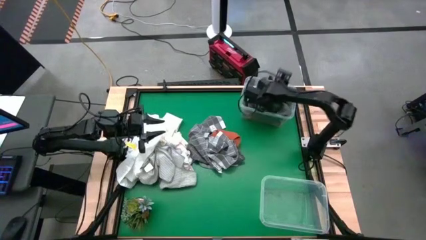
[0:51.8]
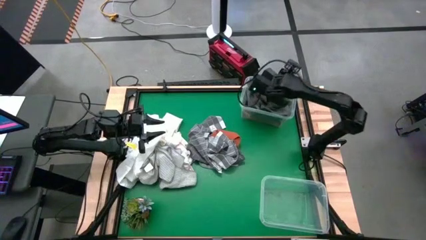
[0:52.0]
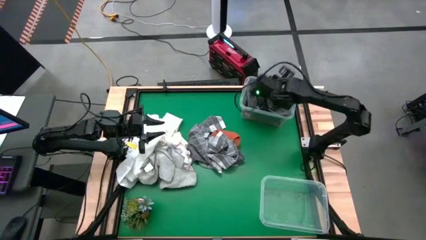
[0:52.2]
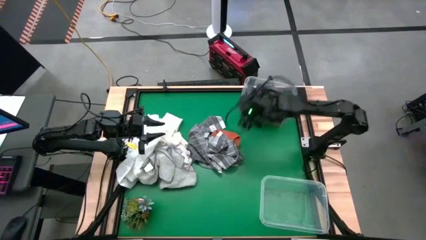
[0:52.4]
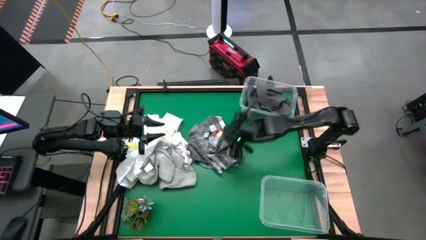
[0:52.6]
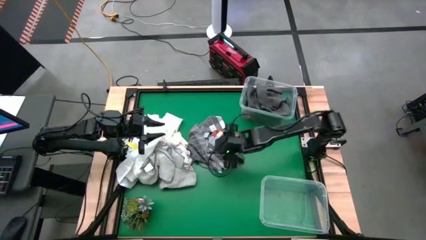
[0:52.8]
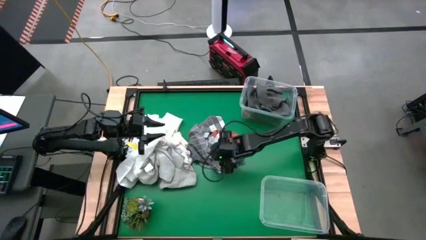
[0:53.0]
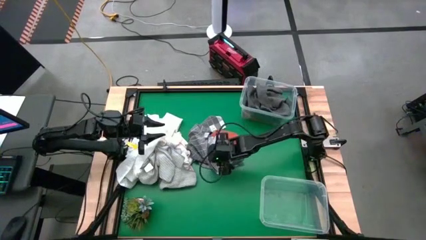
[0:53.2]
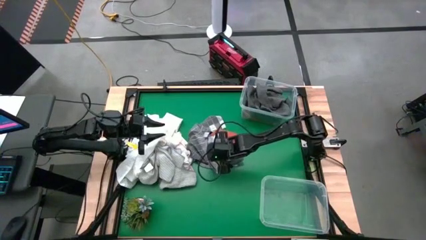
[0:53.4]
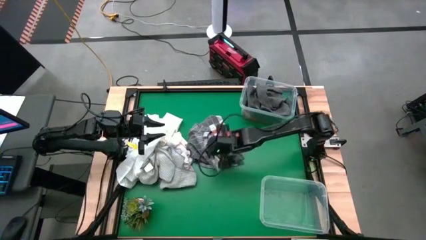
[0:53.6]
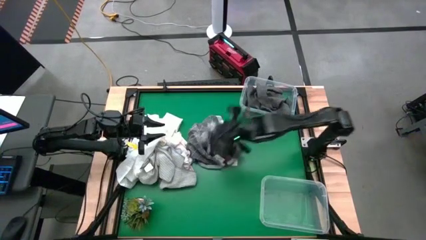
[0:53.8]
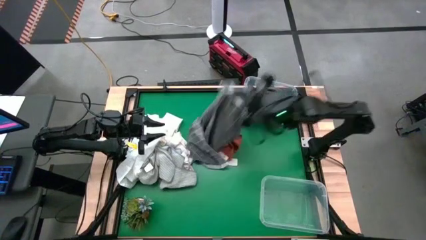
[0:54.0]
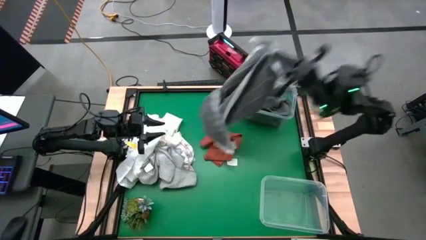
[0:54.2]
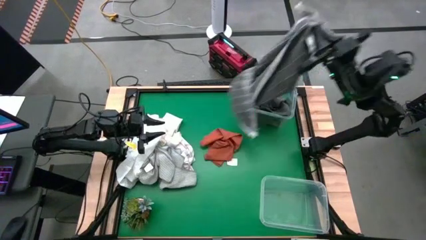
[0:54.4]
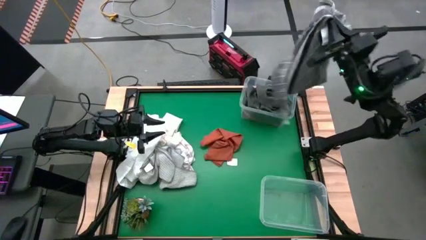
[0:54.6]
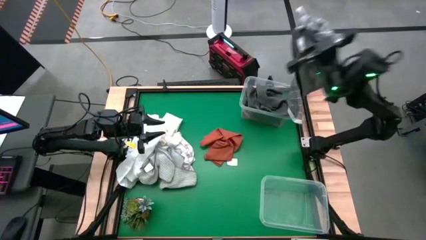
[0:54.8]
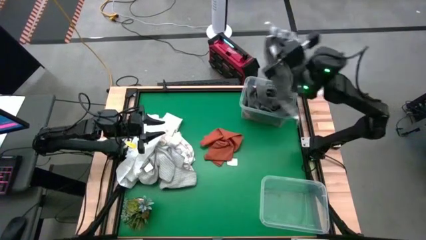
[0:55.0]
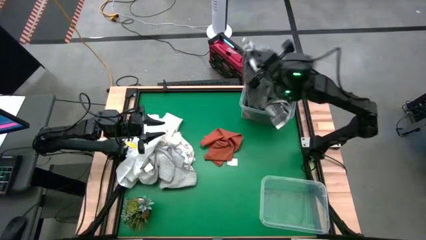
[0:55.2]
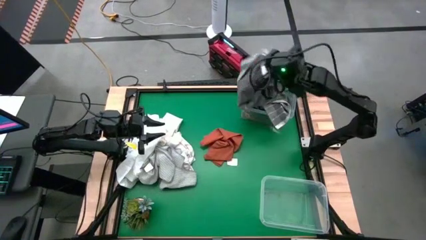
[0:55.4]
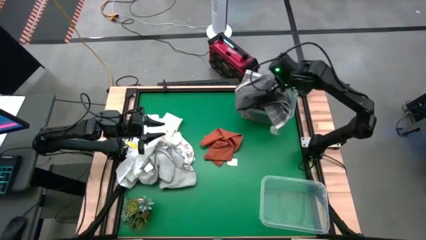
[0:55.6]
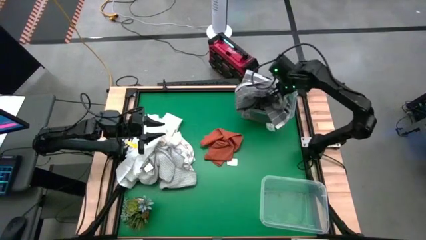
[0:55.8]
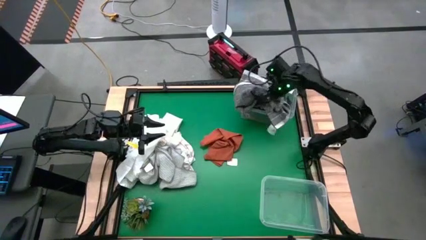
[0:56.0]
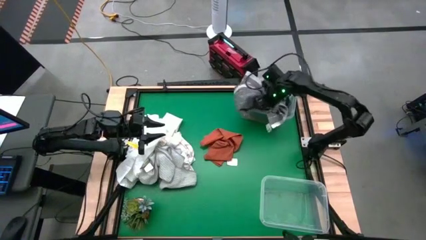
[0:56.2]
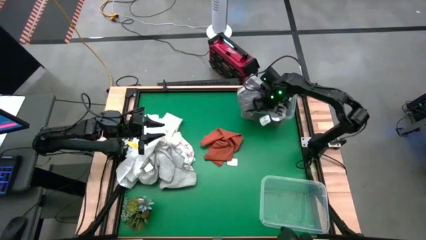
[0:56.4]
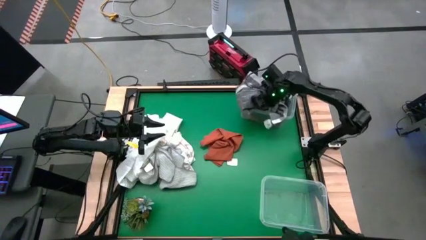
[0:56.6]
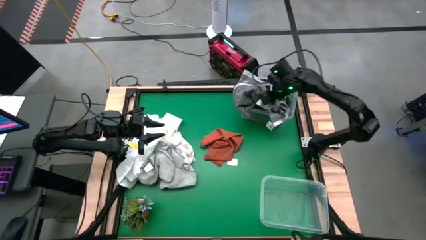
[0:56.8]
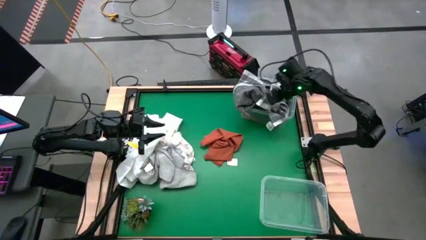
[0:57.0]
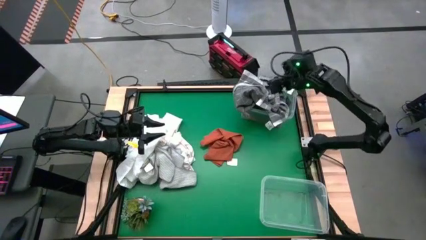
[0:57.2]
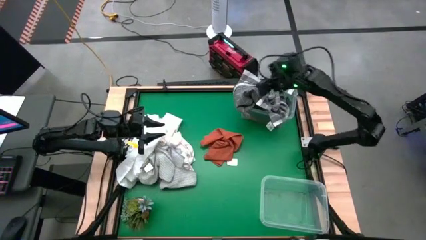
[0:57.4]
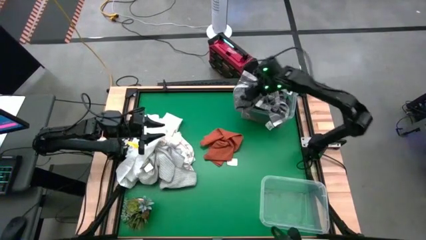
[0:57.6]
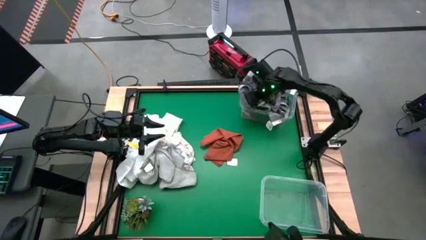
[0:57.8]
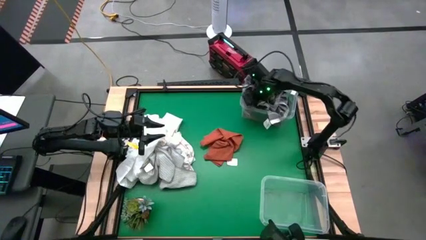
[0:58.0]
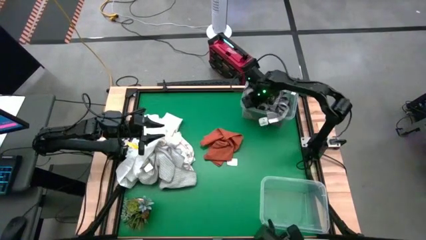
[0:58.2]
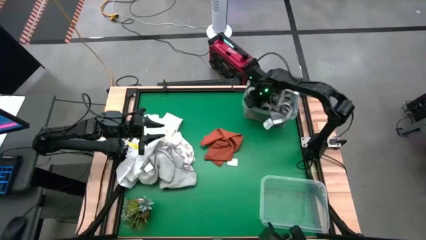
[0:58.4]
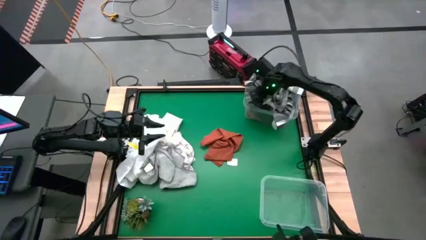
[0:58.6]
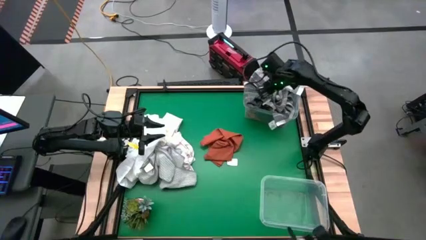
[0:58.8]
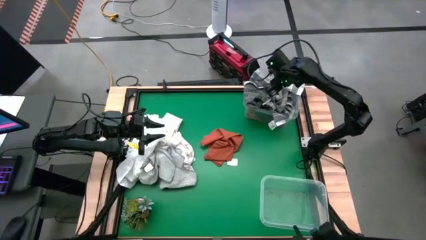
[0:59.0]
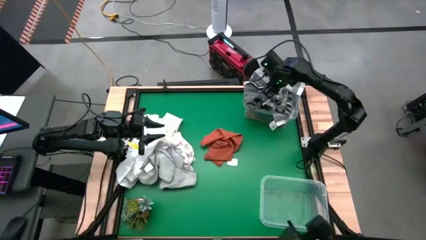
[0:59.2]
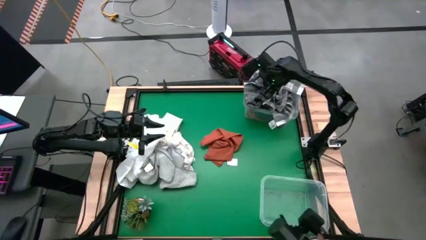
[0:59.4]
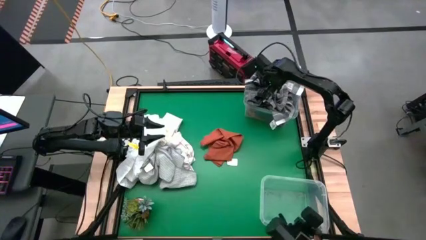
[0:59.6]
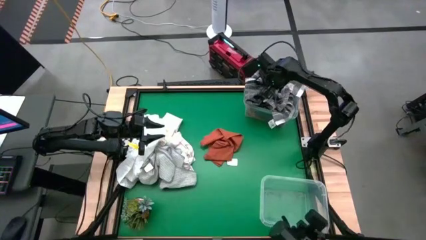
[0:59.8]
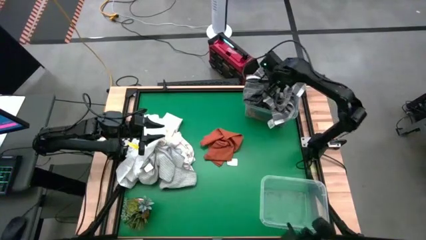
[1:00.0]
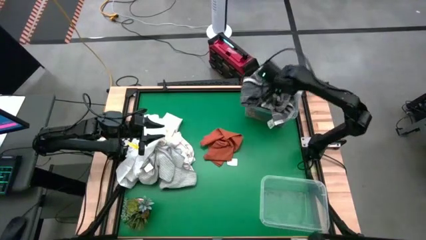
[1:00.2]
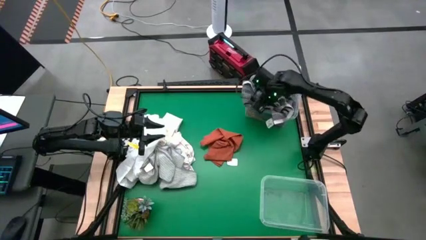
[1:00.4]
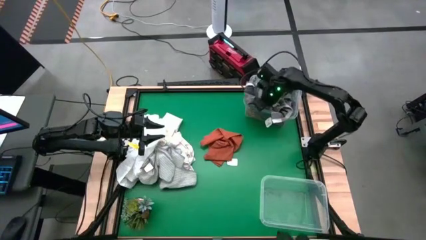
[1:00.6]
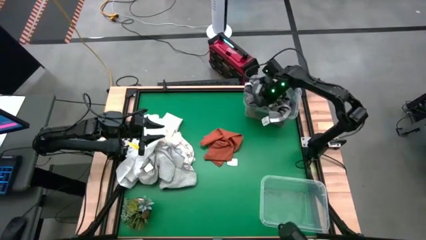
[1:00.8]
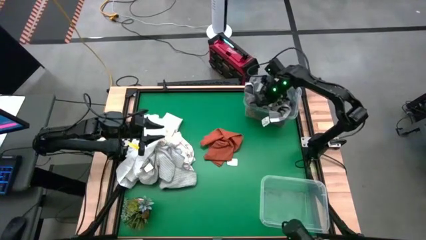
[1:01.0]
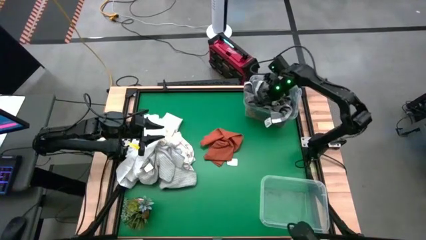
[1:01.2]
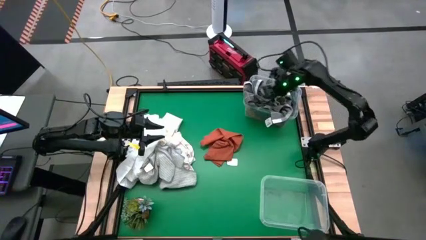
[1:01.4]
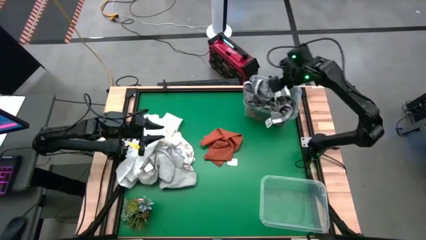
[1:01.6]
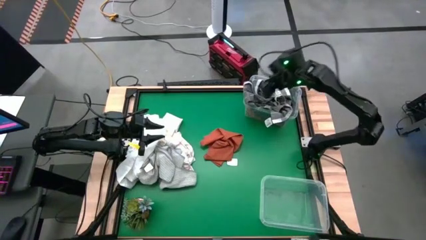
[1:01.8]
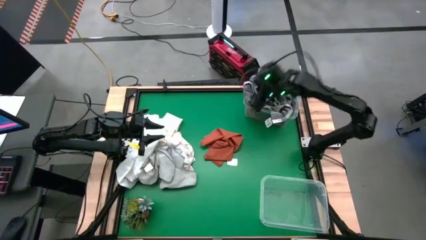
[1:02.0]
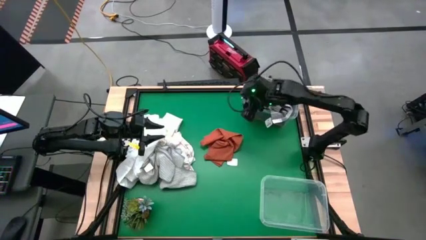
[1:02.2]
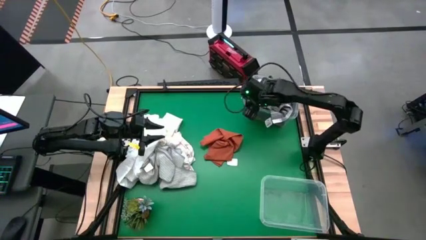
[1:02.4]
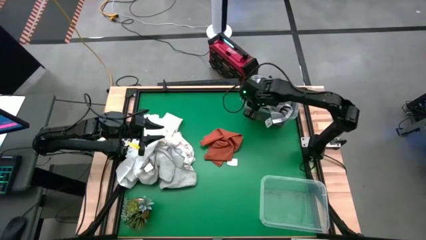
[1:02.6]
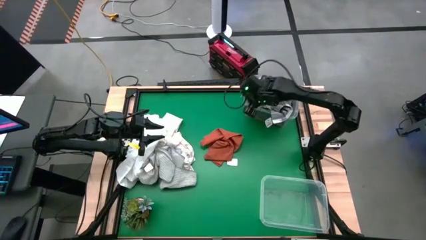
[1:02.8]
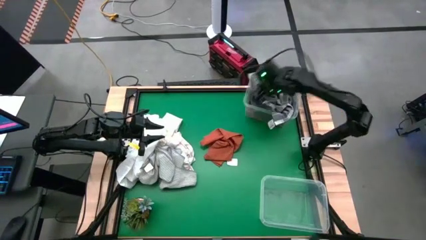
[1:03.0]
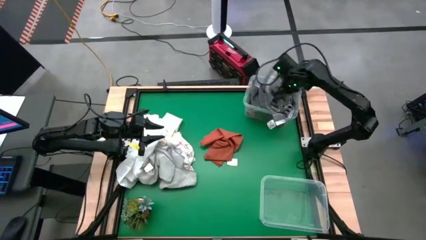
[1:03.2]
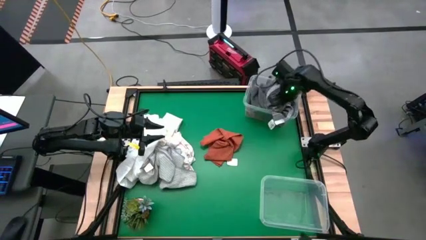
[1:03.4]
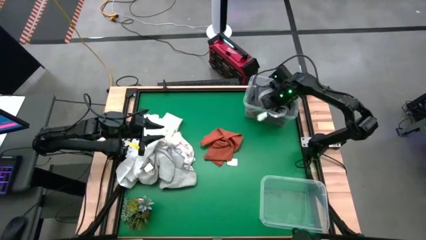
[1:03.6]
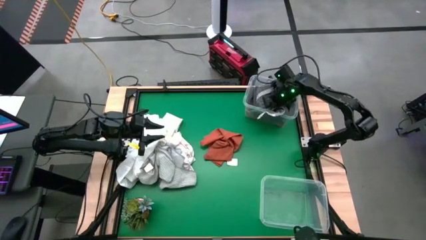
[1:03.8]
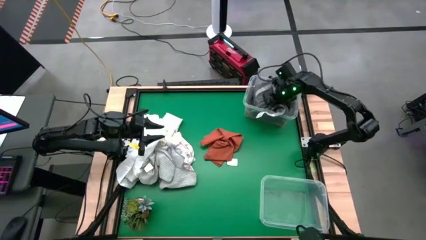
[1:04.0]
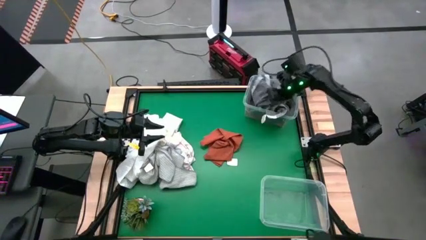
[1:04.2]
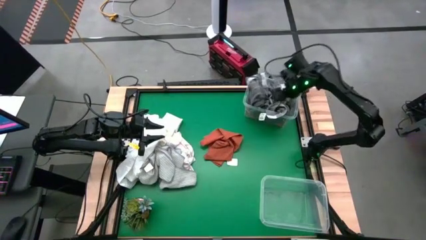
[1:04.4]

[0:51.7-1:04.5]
Task: Sort towels by color in basket
Put the gray patterned towel into the top transparent bin
